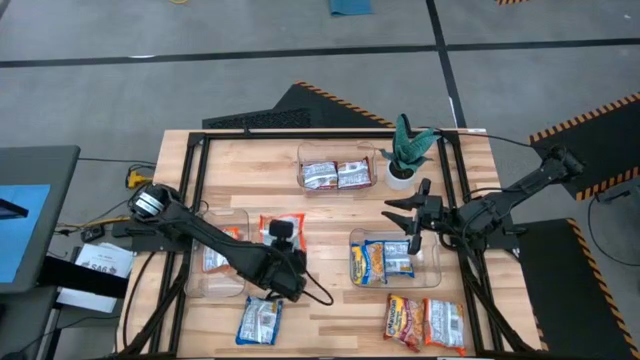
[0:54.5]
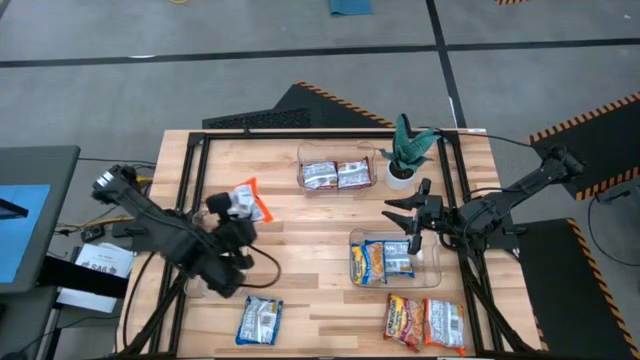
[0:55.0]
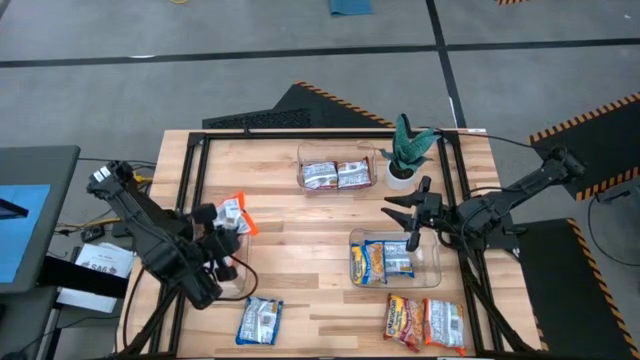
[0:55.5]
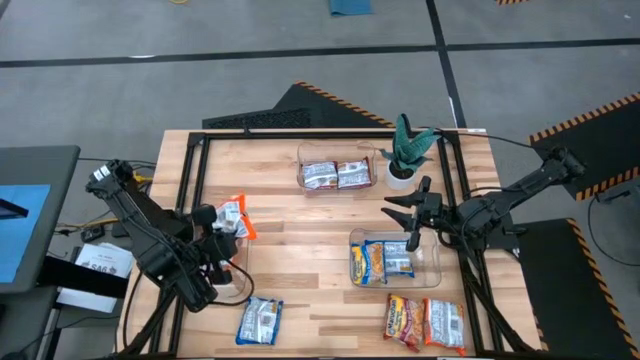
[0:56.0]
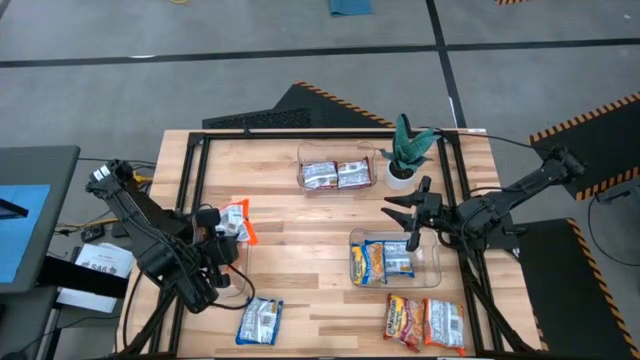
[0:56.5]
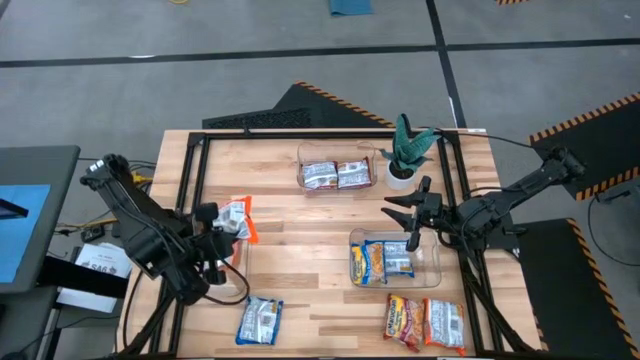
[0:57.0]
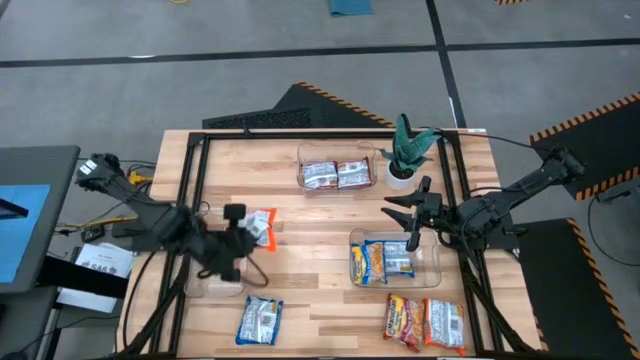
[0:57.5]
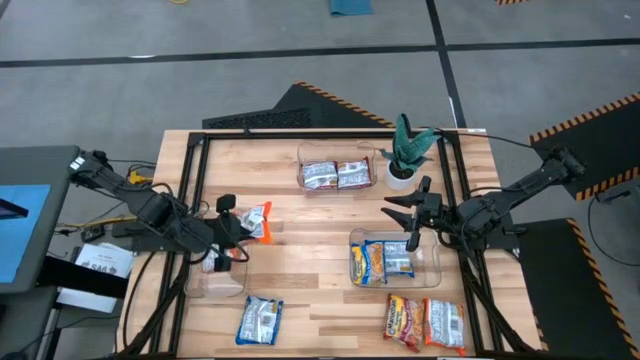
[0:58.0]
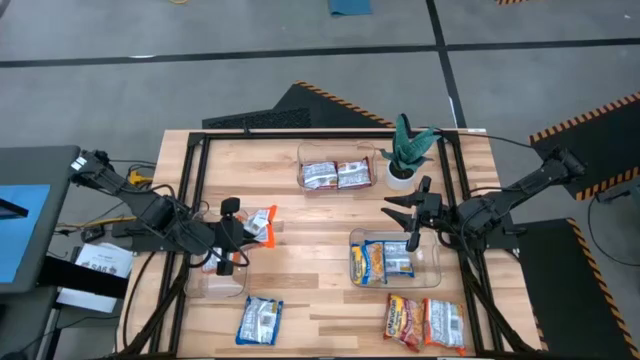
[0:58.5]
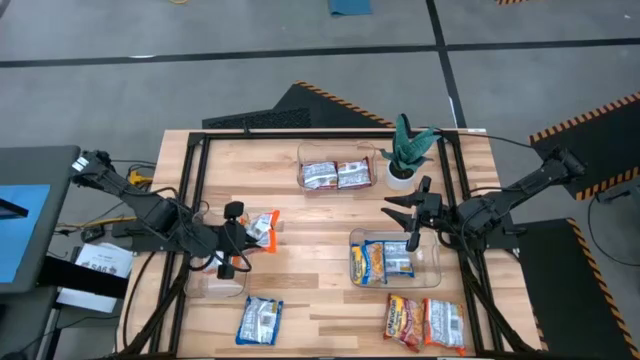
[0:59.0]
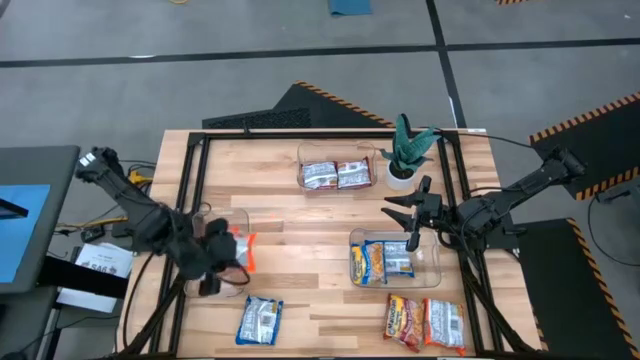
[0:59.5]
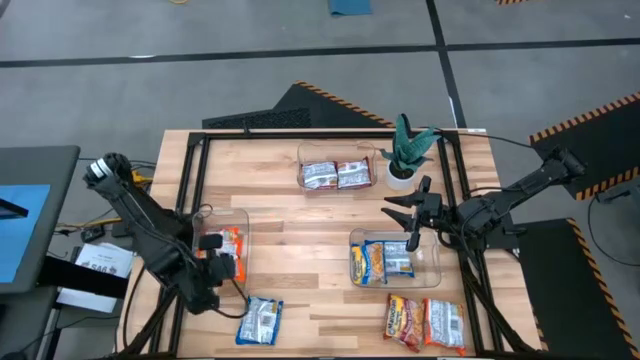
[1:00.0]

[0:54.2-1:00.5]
Task: Sort Maruchan noodles
Put the left orange bag into the bottom left transparent bin

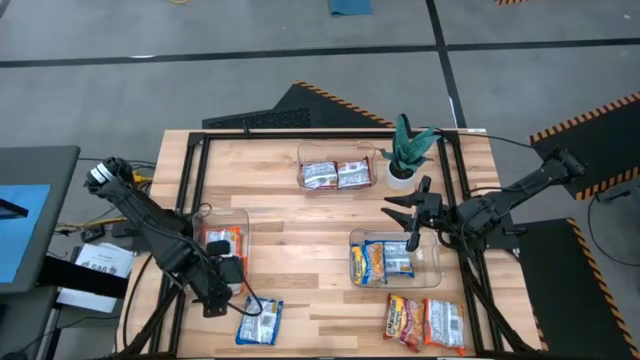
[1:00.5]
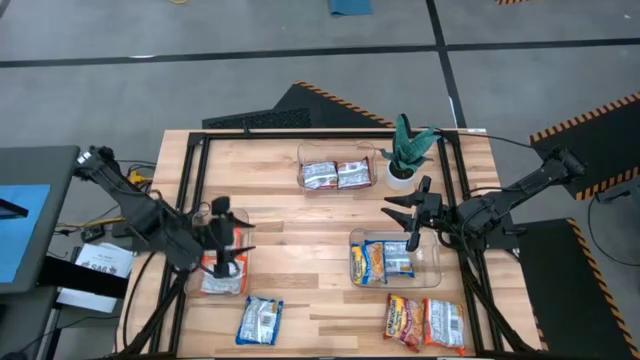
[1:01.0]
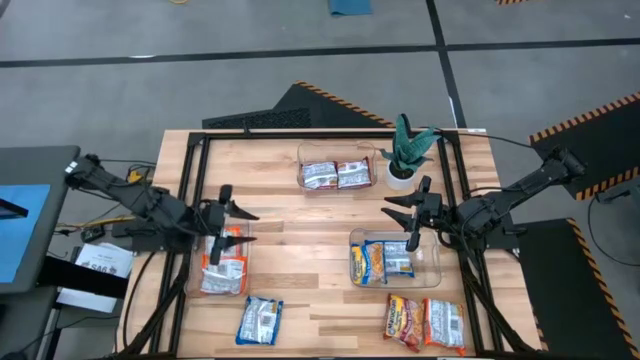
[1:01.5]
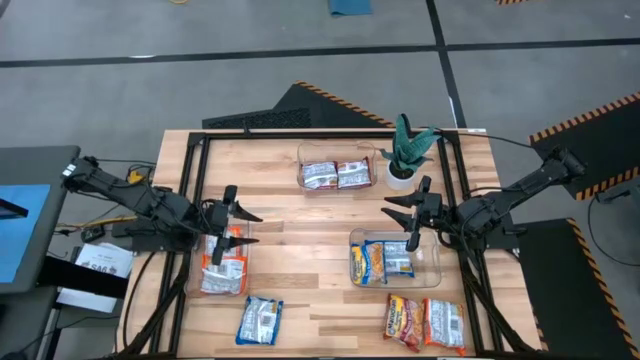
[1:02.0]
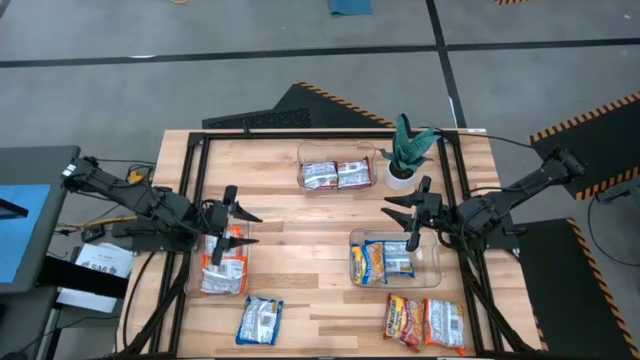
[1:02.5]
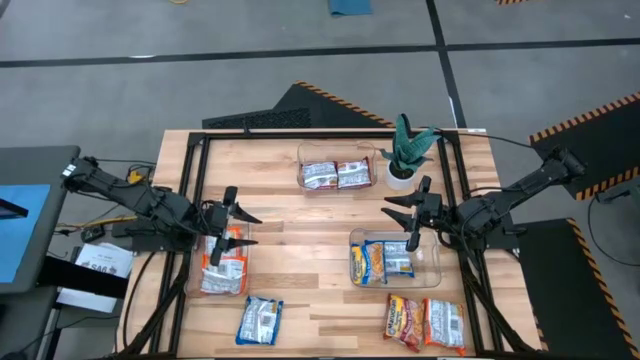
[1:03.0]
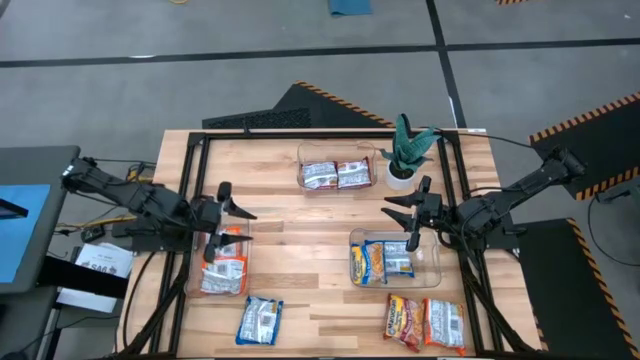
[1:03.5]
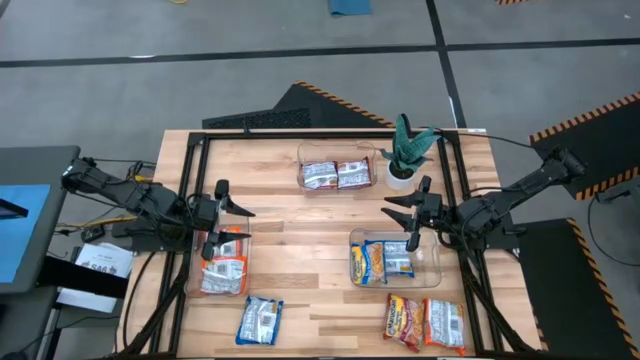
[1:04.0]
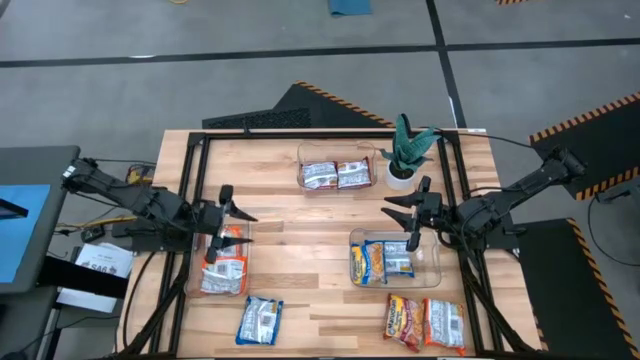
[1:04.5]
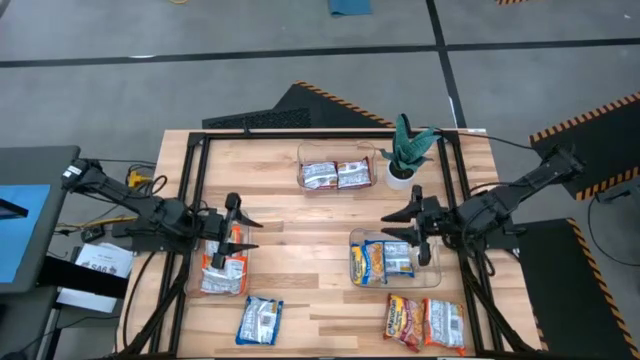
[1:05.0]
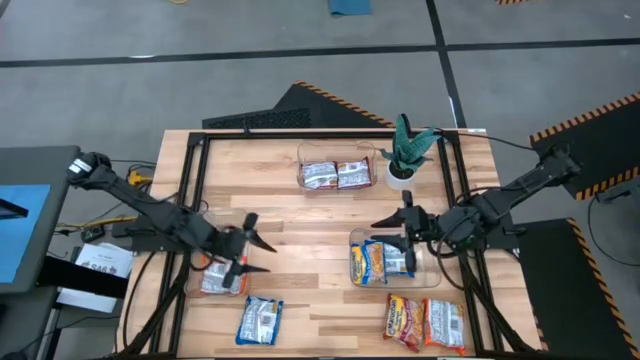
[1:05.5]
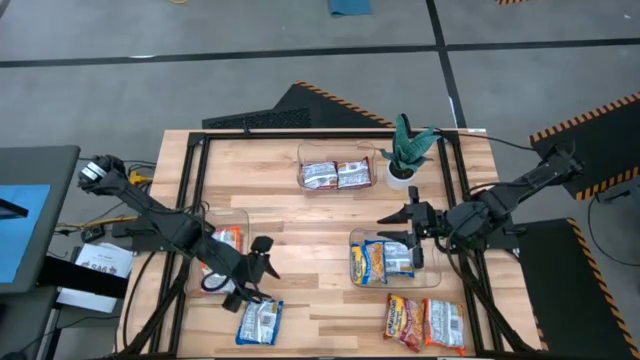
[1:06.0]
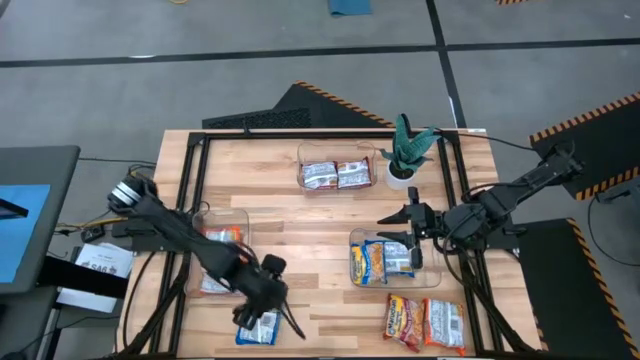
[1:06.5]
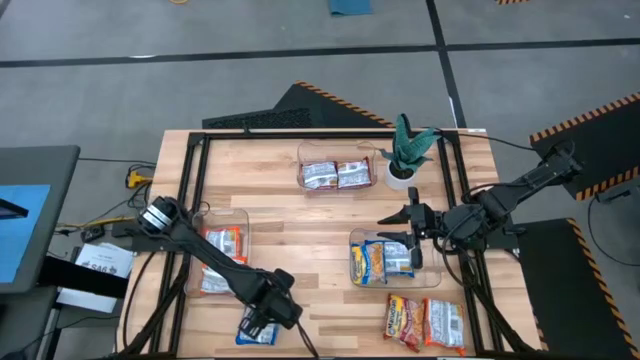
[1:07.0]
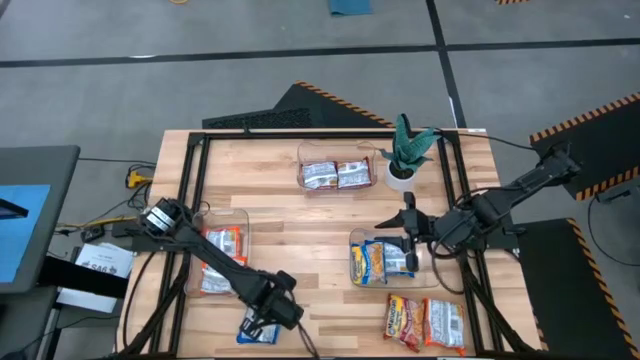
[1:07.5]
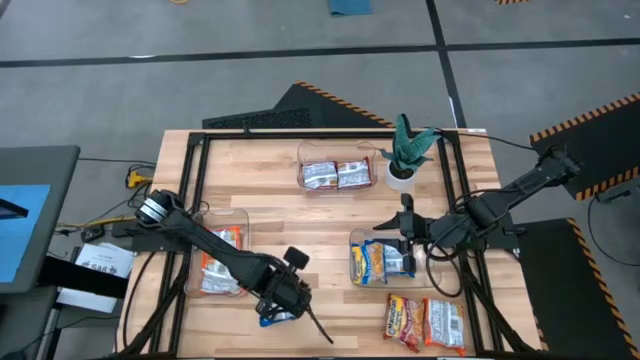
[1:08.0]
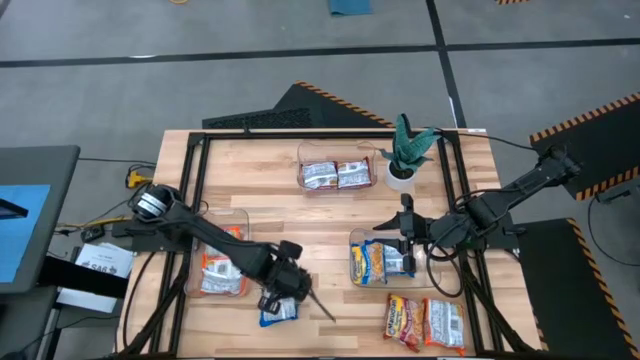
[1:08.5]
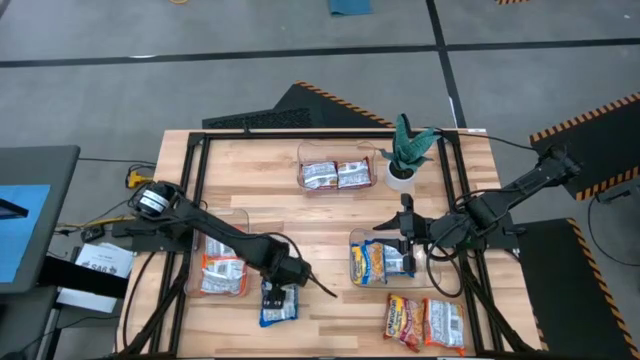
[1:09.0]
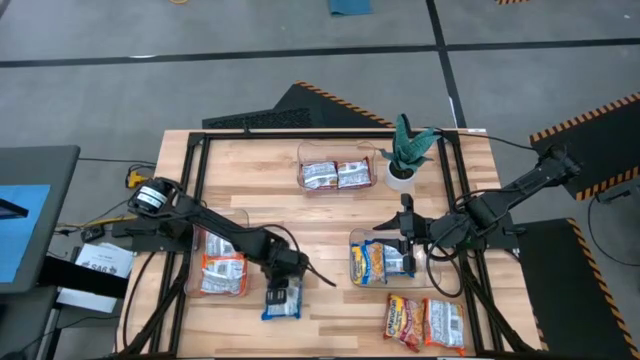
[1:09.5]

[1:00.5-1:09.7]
Put the blue bag into the bottom right transparent bin

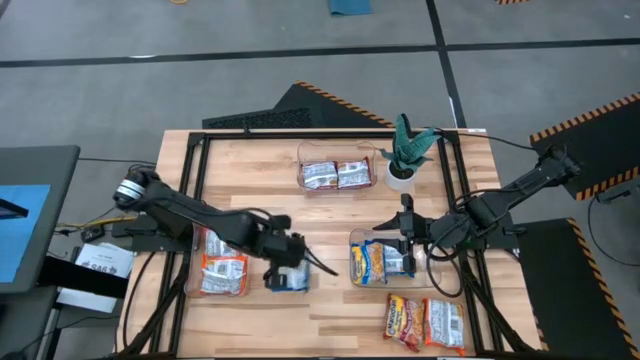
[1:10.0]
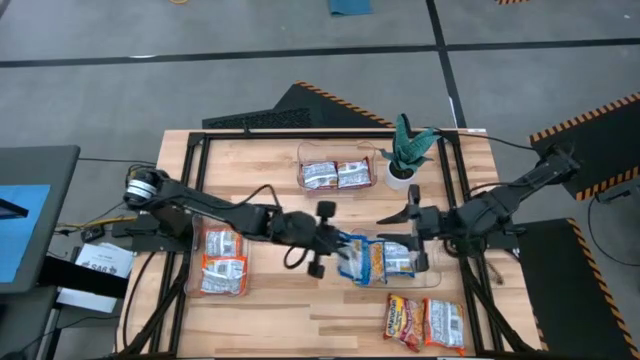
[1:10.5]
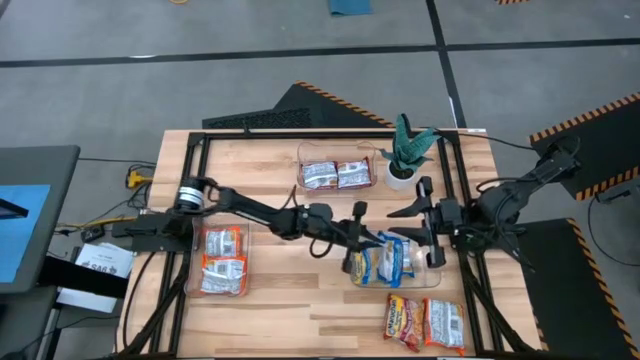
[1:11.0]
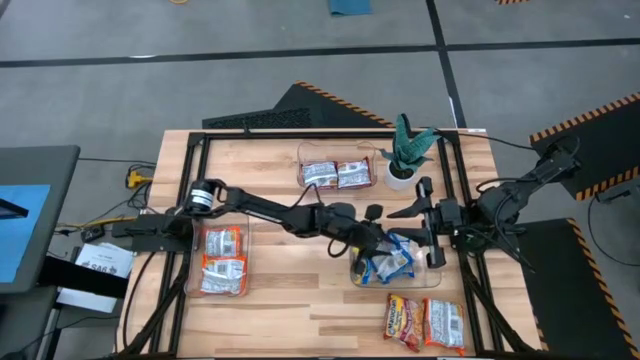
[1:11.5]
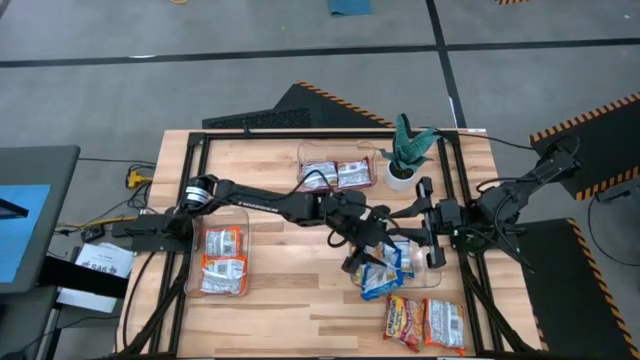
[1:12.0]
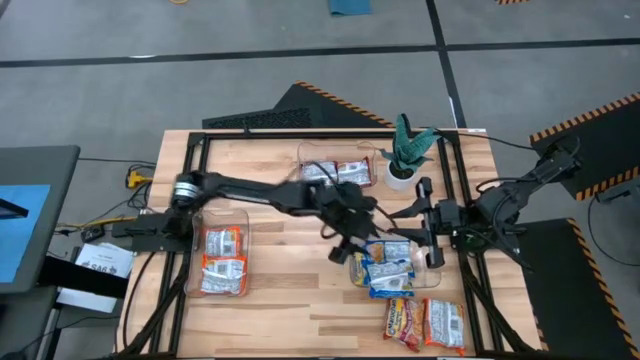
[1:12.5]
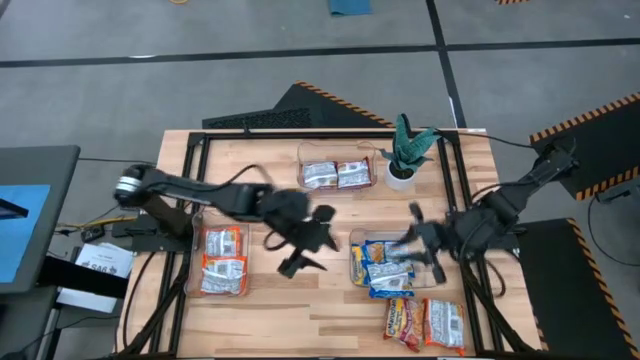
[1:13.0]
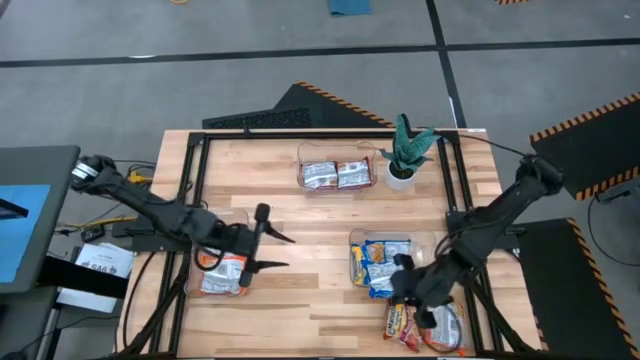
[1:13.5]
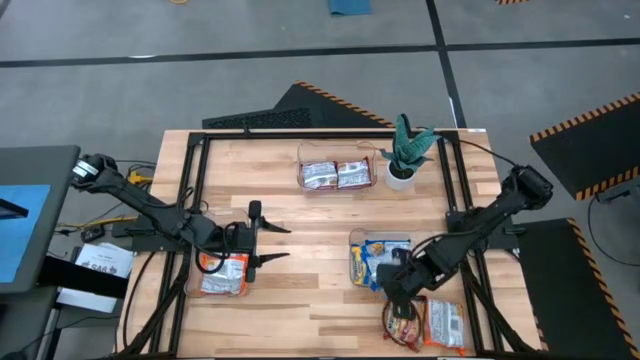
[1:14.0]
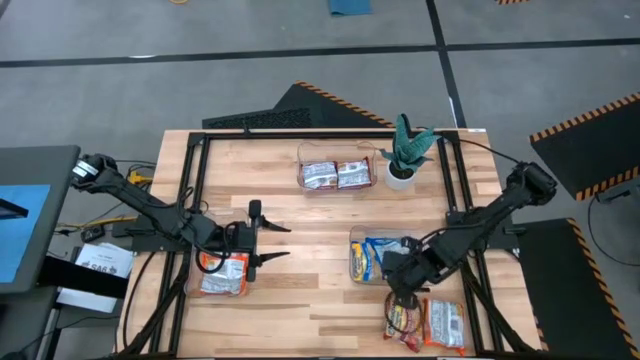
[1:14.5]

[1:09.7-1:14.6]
Put the blue bag into the bottom right transparent bin

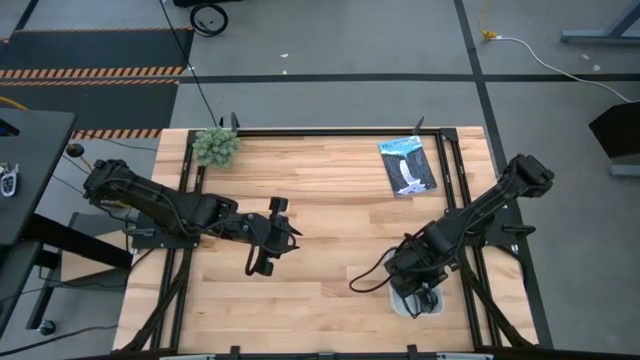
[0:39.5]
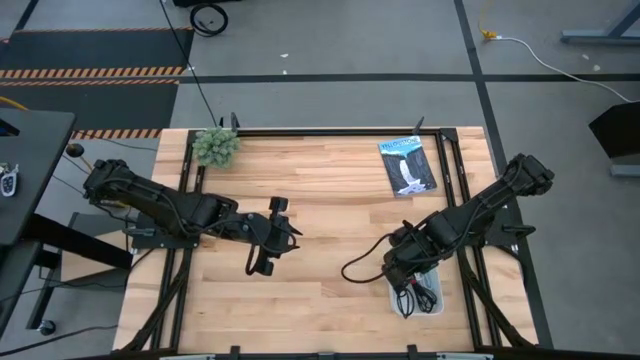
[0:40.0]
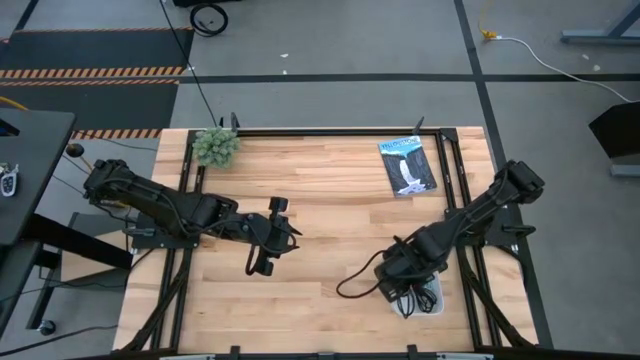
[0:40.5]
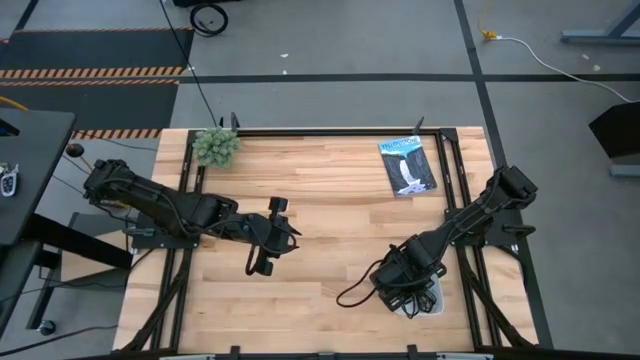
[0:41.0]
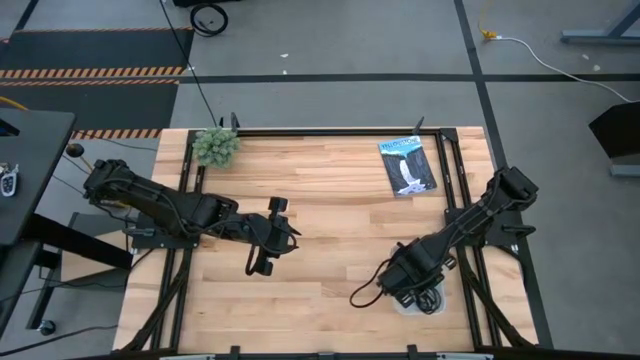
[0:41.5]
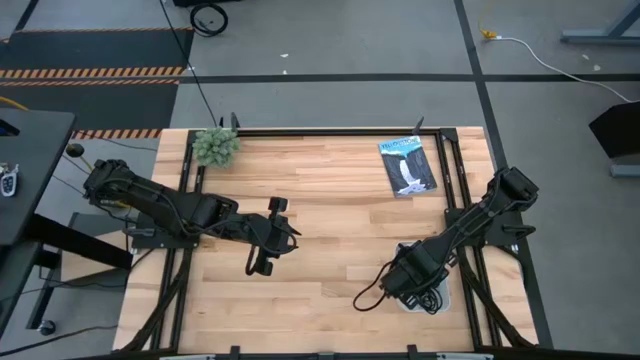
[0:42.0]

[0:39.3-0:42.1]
Task: Pick and place USB-C Cables
Adjust the black charger cable in the white bin
